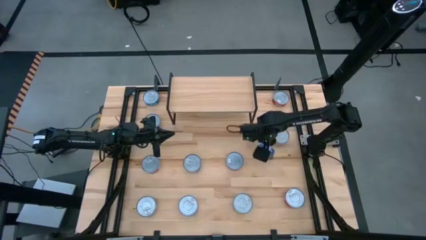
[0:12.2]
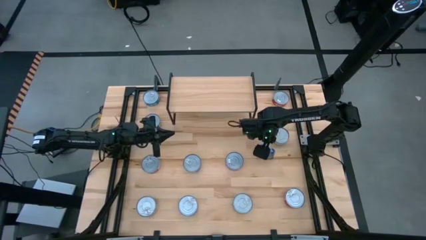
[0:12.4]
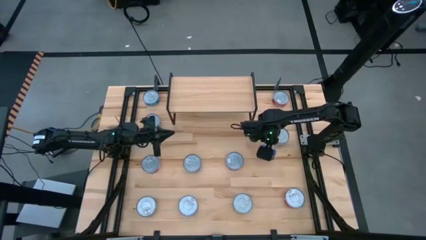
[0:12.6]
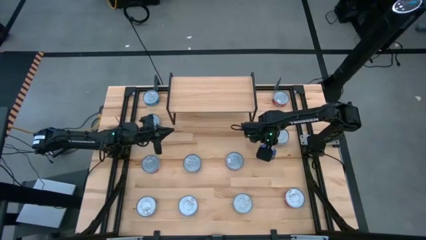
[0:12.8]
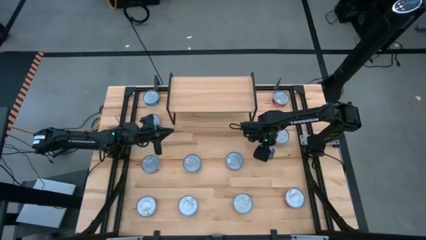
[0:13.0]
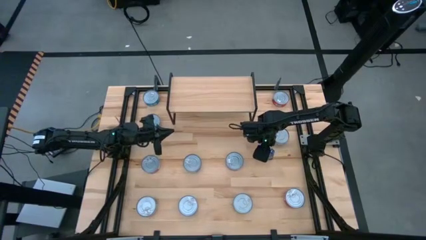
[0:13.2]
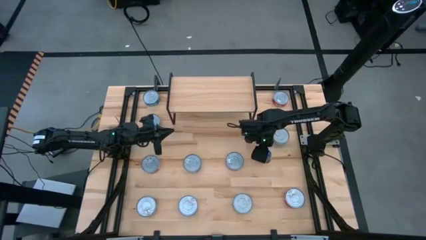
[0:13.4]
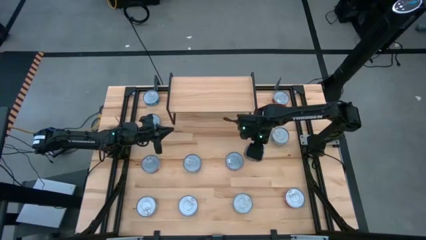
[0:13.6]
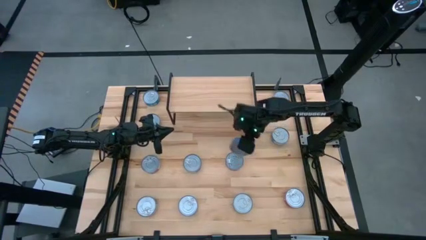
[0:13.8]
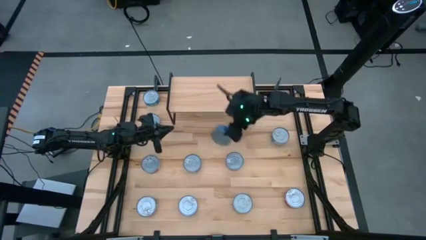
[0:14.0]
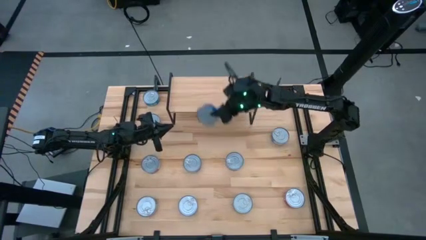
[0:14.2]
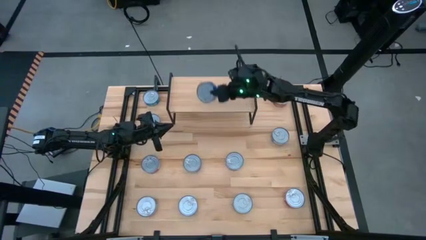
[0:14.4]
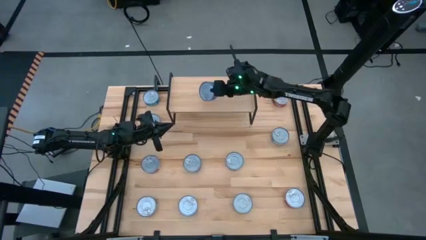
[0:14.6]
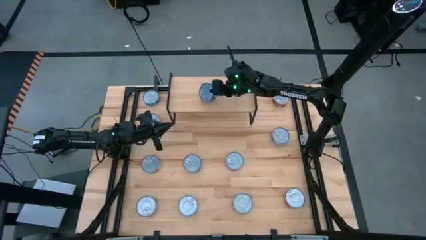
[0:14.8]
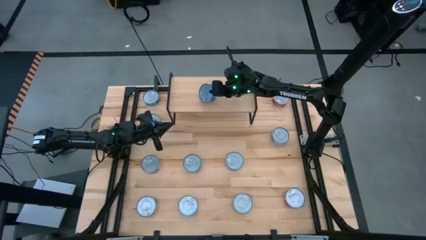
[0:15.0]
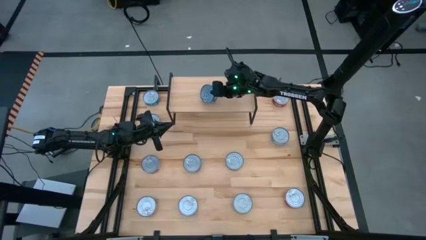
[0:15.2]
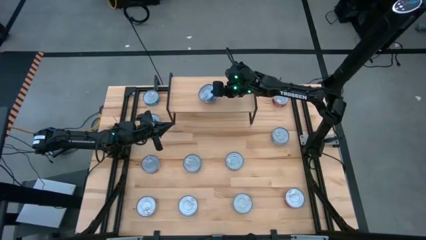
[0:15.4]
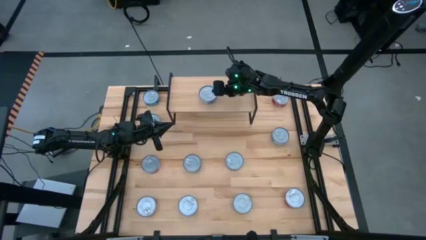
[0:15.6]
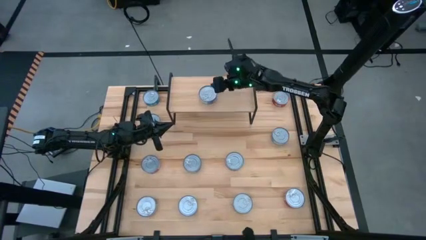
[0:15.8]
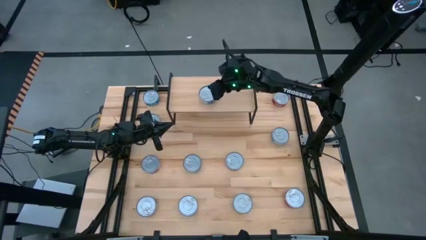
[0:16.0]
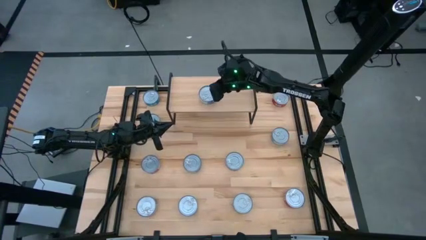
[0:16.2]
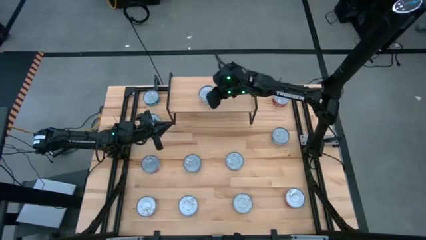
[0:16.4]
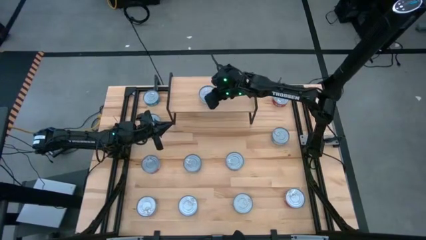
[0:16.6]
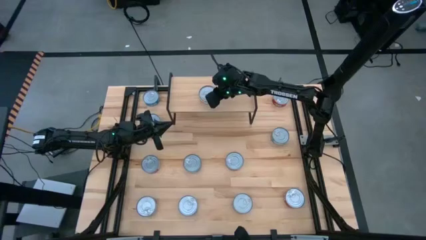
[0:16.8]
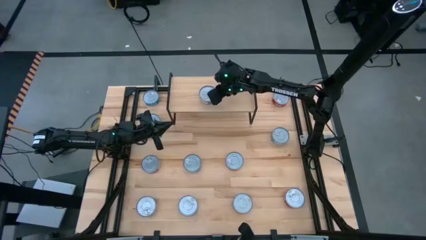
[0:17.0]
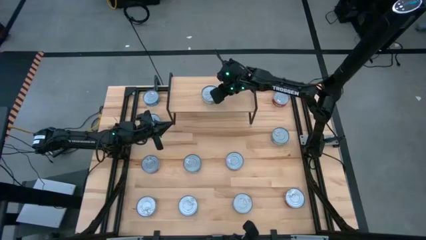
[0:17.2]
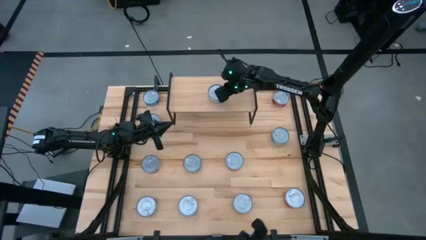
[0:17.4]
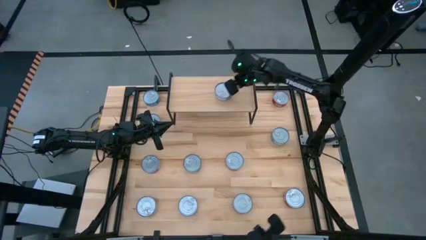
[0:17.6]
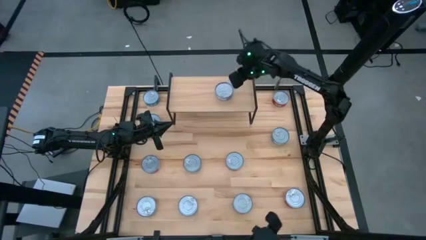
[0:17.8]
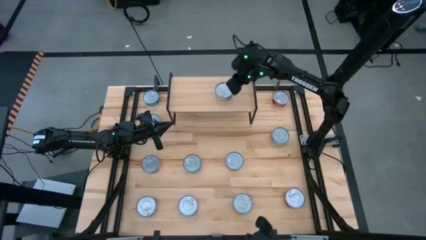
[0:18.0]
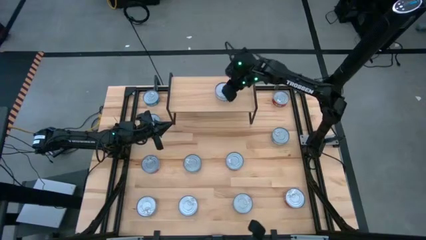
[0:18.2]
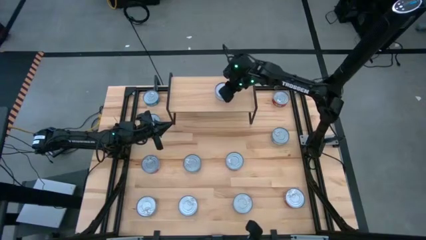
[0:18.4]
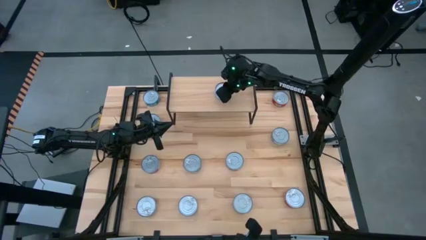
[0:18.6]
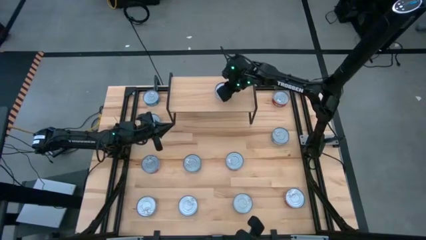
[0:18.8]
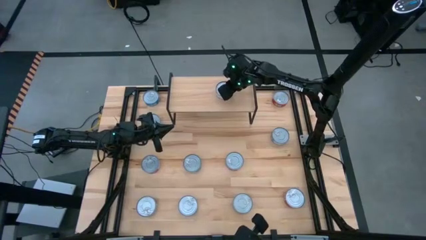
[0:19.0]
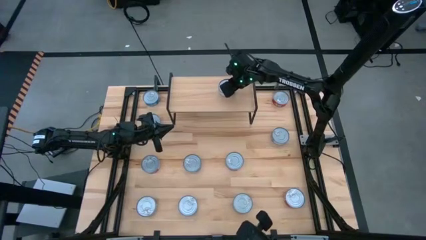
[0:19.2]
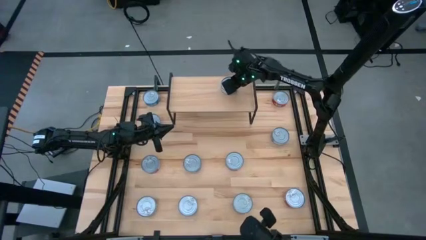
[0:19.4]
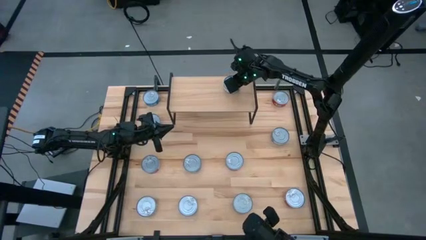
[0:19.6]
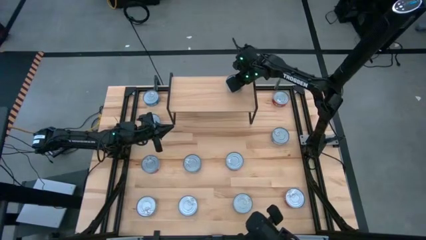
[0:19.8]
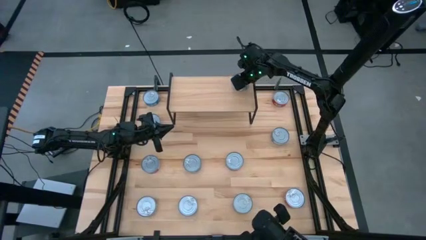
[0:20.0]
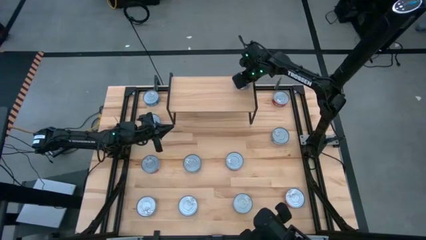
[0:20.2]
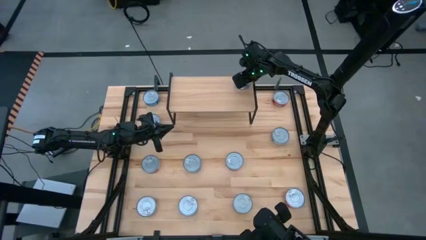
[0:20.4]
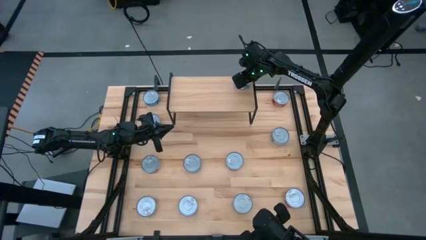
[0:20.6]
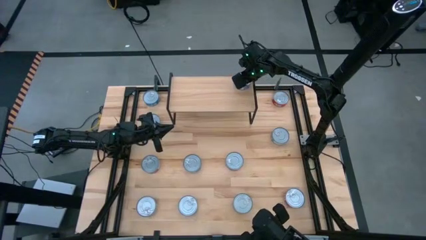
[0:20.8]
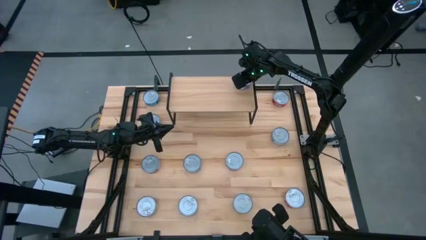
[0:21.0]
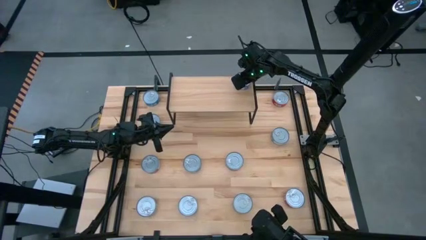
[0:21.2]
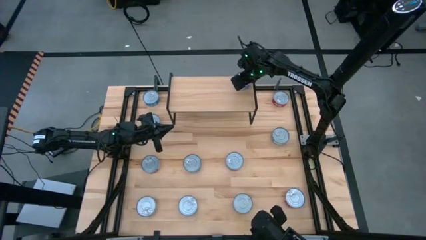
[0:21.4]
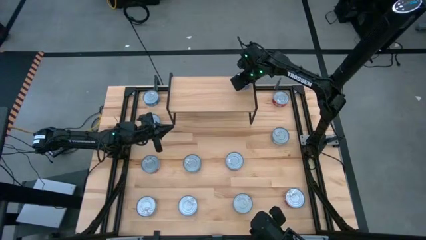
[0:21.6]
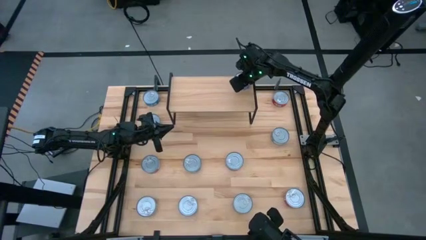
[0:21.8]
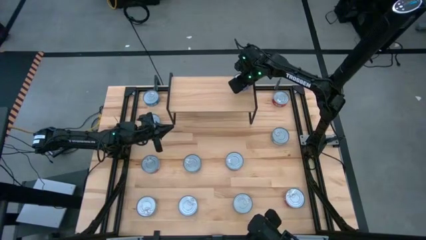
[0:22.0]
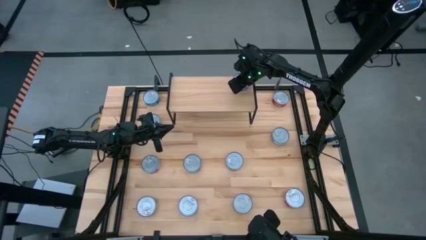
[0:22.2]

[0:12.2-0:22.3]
Task: Stack canned seafood by type on shelf
Put the middle right blue tuna can on the shelf

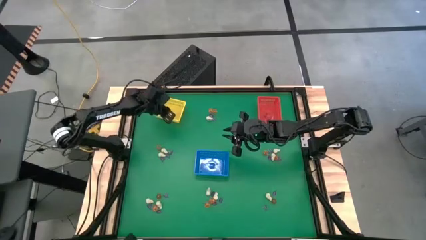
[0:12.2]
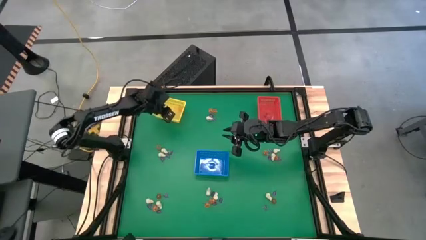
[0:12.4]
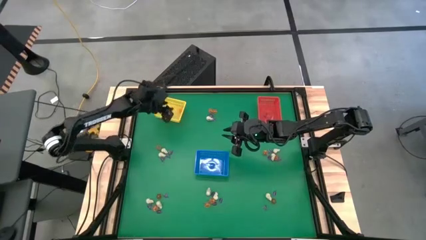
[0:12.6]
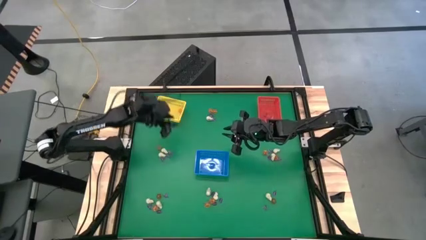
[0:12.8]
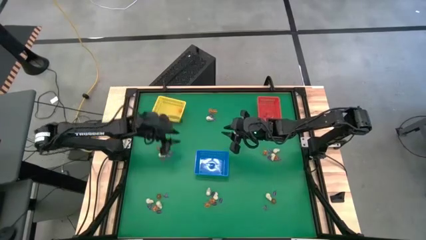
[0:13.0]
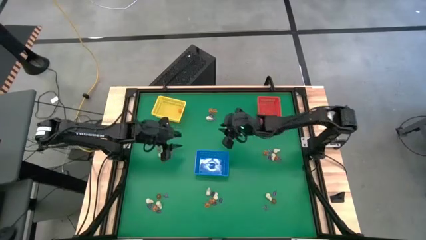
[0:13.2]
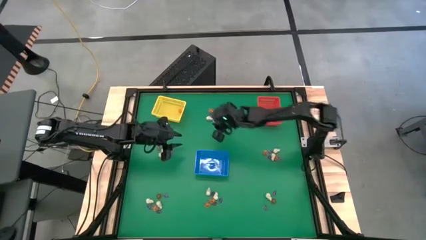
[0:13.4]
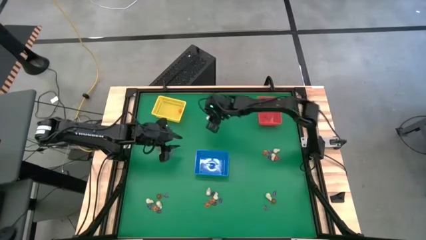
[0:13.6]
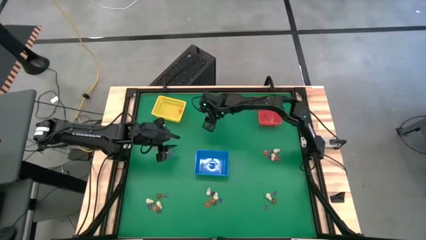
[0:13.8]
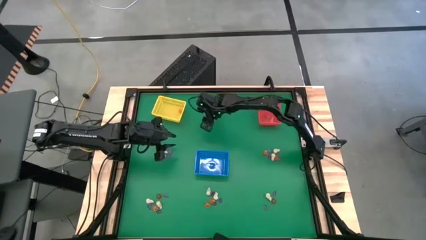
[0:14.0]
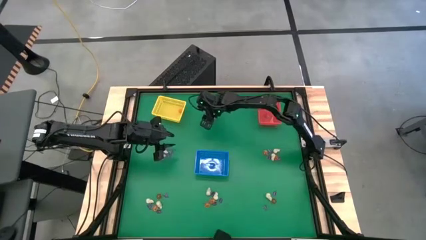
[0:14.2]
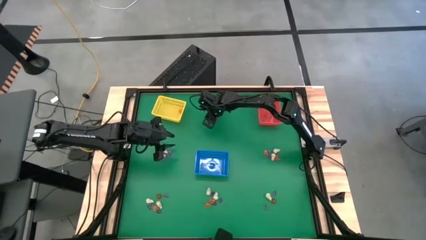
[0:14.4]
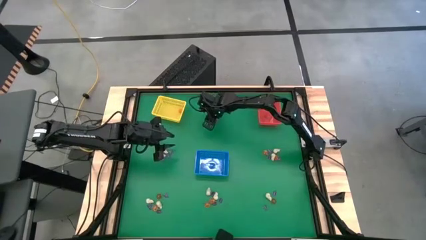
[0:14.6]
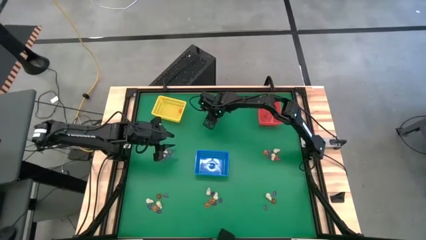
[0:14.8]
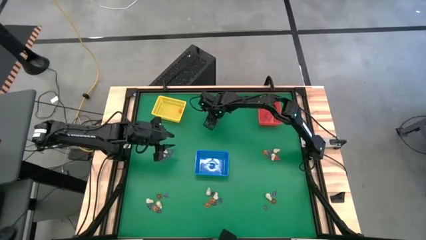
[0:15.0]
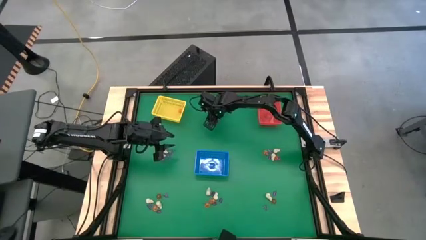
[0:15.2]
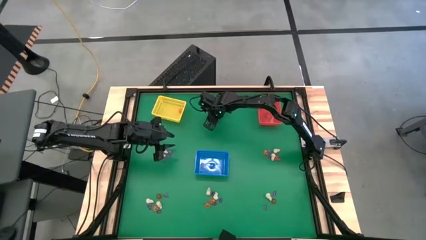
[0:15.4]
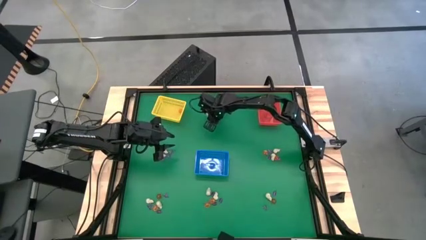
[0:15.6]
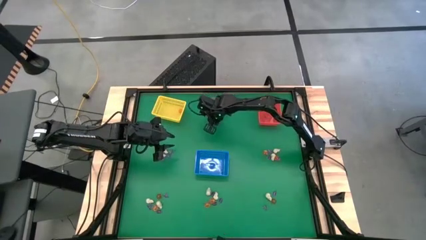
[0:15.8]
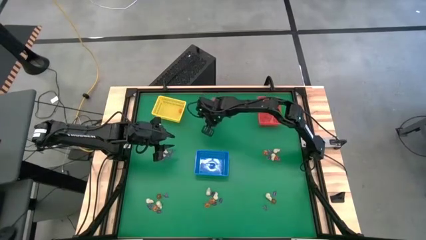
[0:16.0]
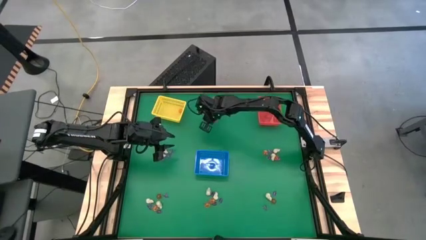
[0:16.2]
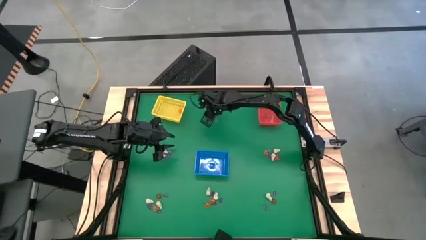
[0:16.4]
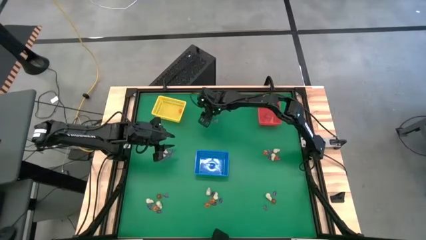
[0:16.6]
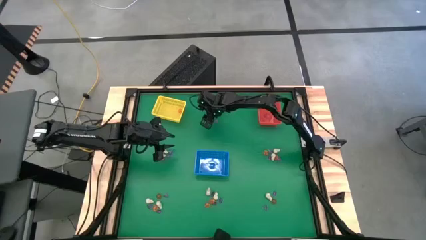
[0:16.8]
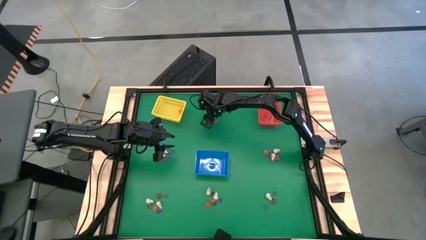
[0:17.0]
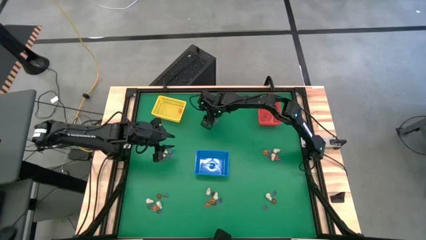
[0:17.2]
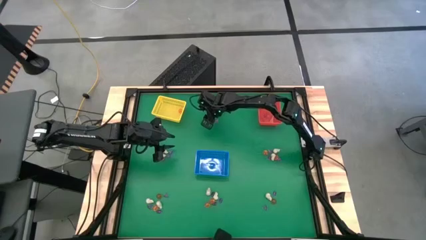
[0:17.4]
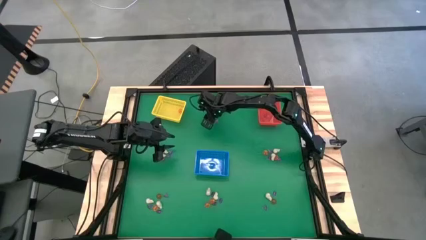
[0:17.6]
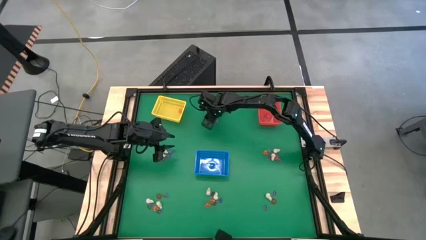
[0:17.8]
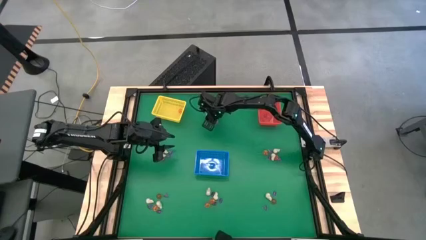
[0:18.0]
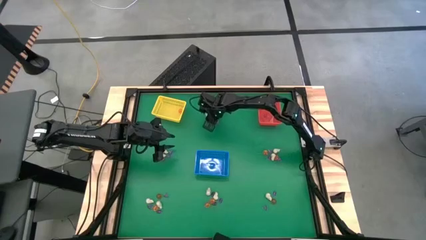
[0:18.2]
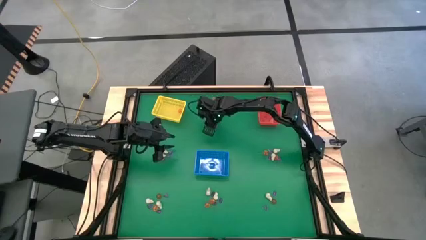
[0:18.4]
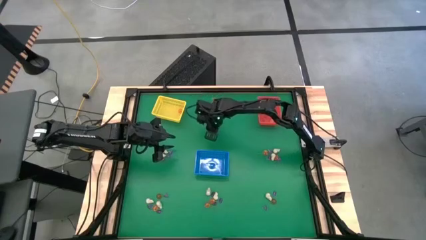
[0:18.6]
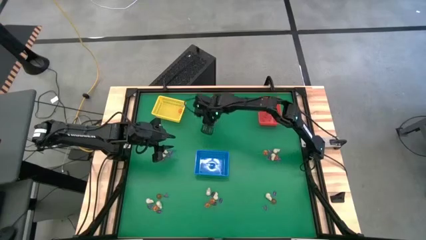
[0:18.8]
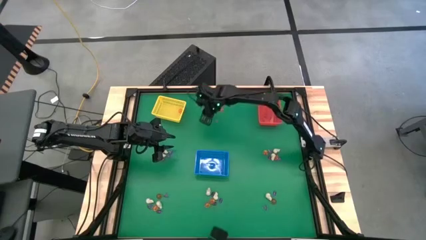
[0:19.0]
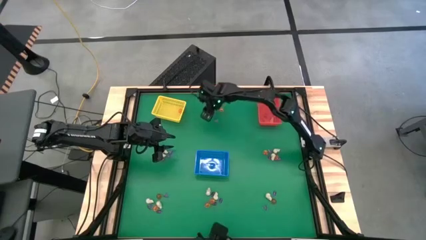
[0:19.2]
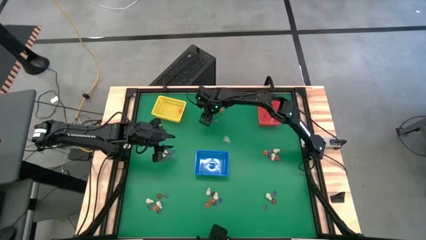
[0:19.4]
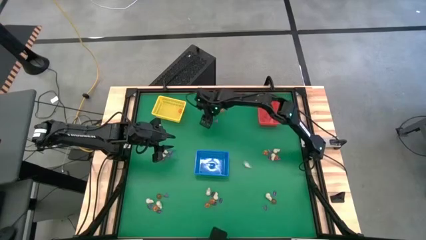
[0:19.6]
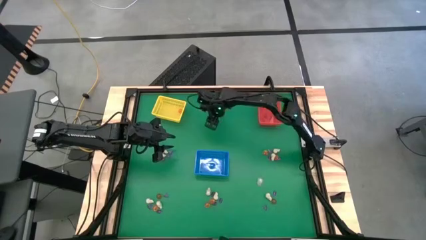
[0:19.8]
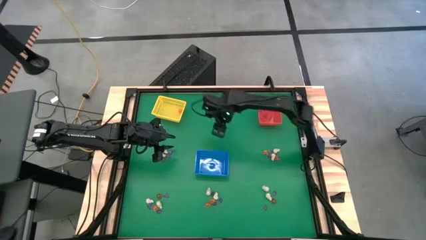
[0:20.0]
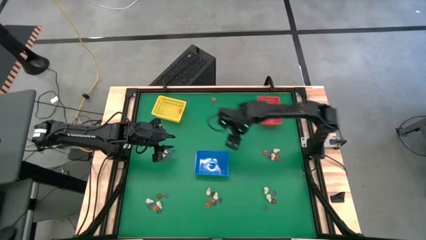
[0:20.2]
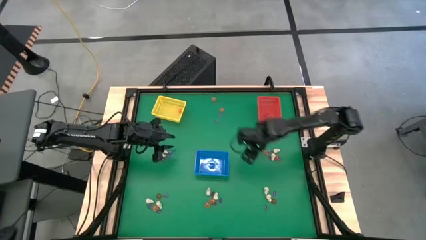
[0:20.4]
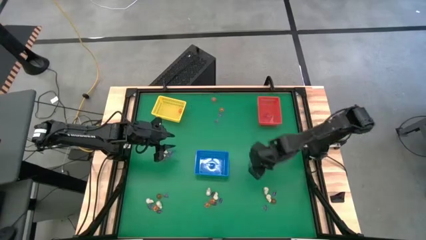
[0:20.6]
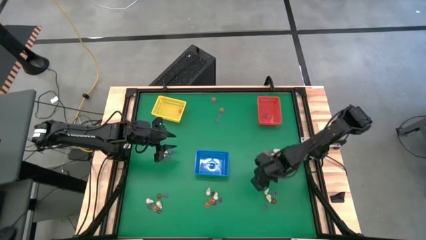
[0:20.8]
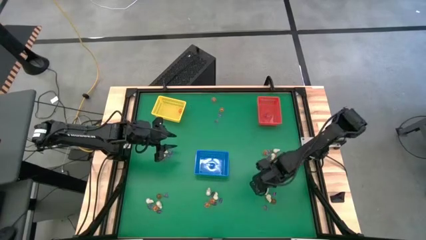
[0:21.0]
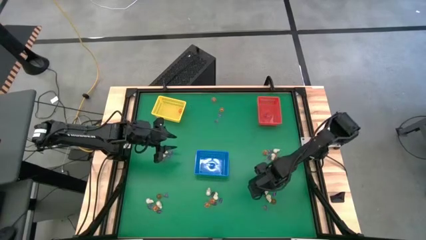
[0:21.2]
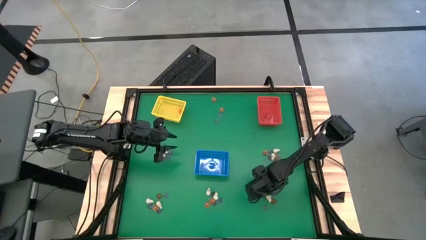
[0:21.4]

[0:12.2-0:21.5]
Task: Sort Halloween decoration
Put the white skull toy into the blue bin
